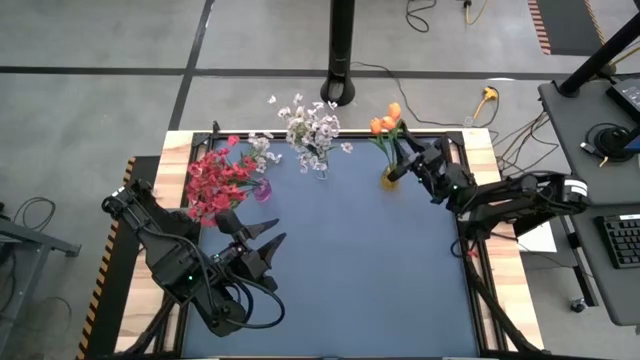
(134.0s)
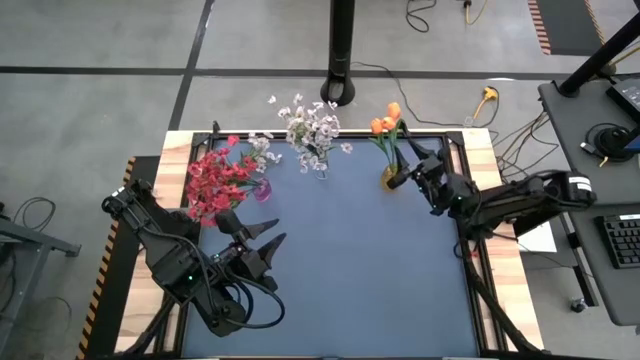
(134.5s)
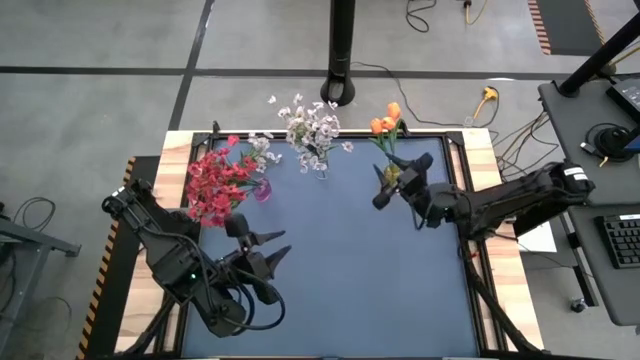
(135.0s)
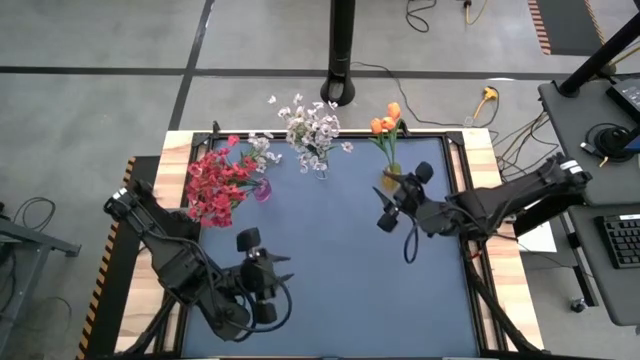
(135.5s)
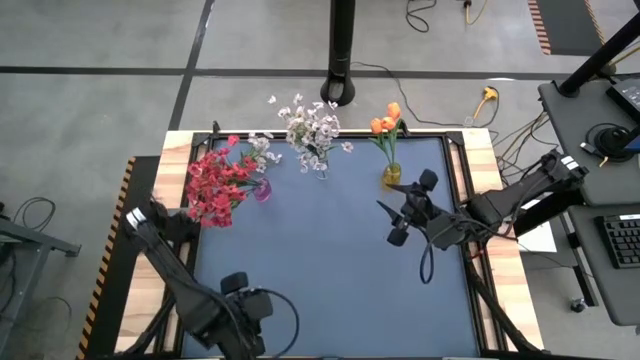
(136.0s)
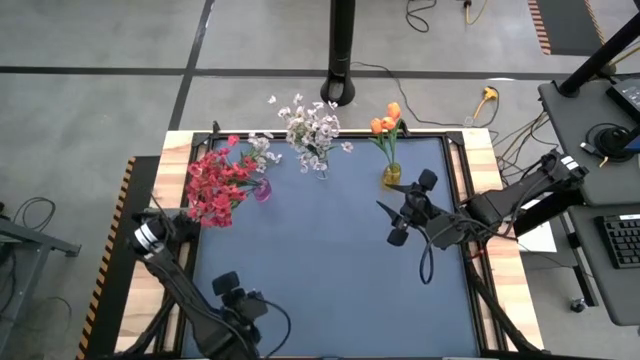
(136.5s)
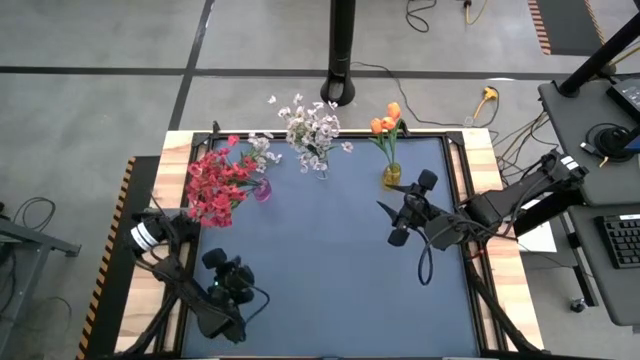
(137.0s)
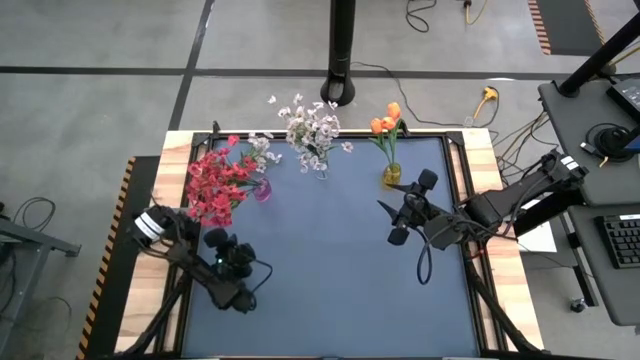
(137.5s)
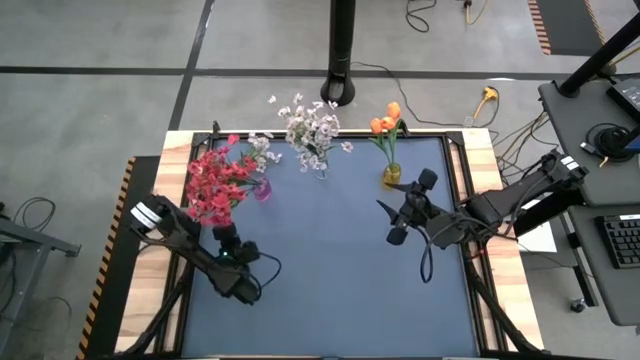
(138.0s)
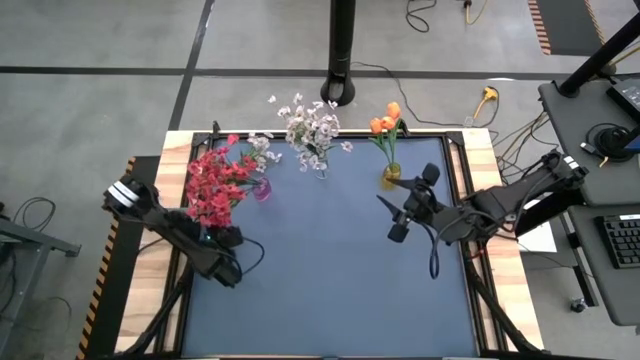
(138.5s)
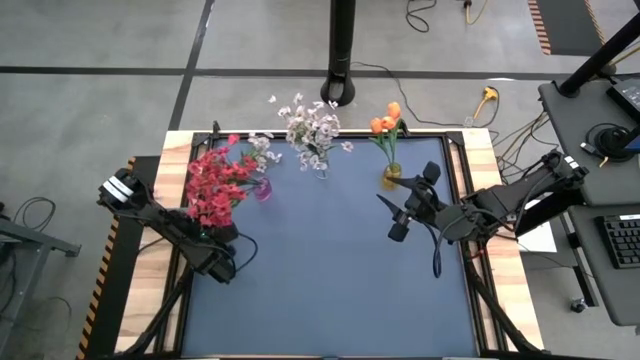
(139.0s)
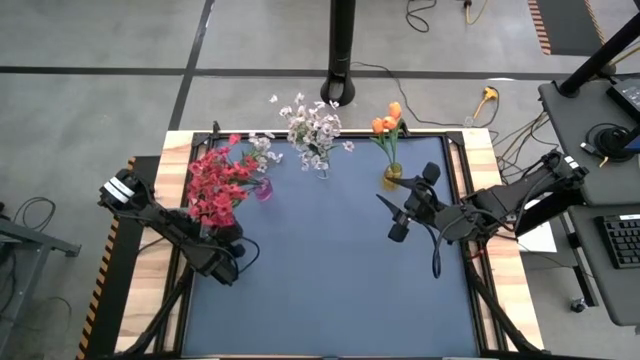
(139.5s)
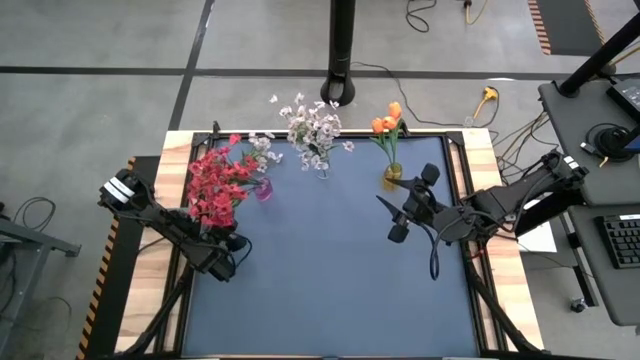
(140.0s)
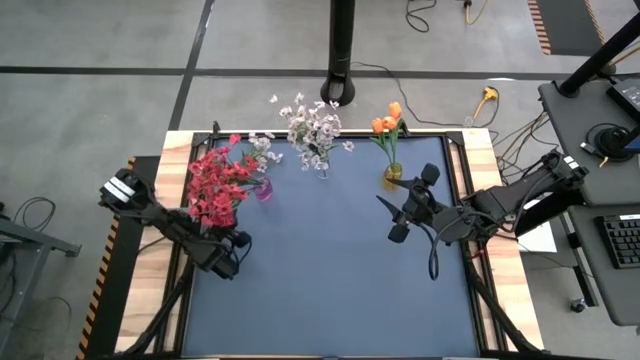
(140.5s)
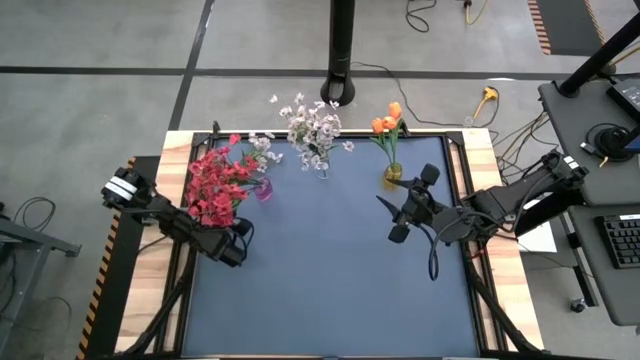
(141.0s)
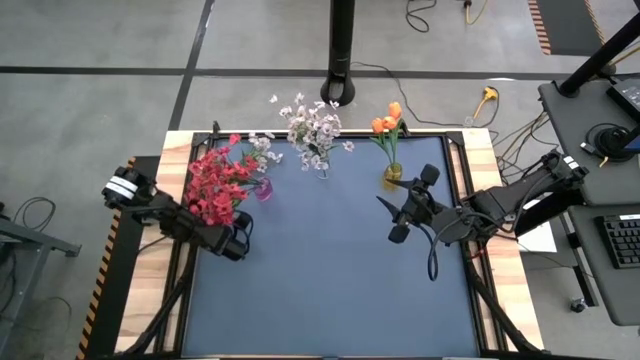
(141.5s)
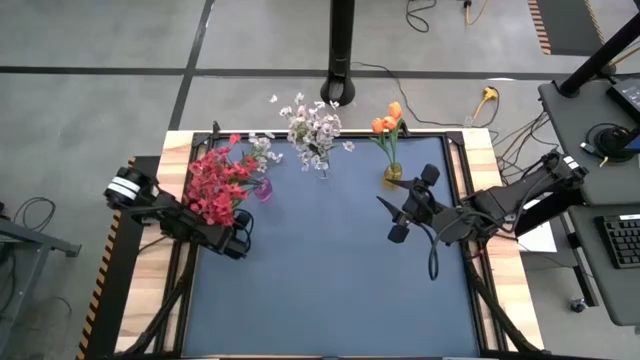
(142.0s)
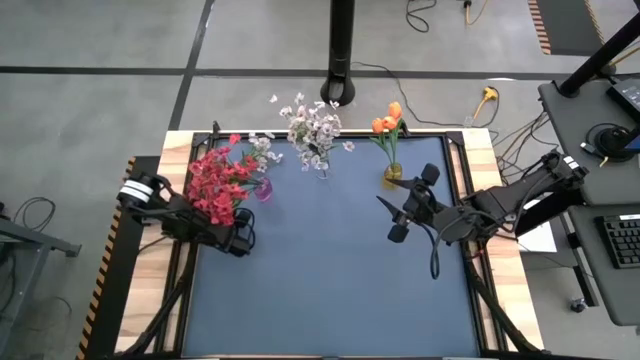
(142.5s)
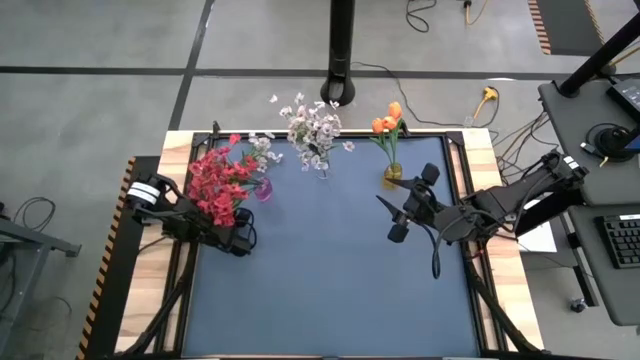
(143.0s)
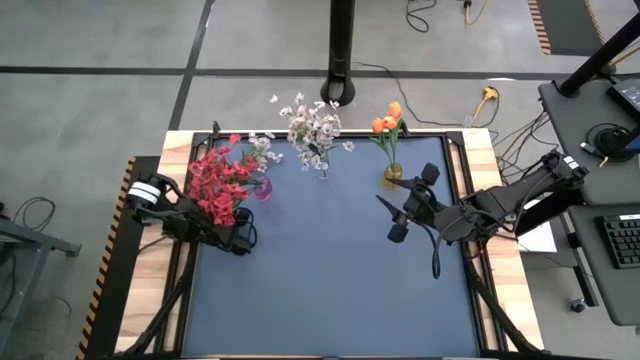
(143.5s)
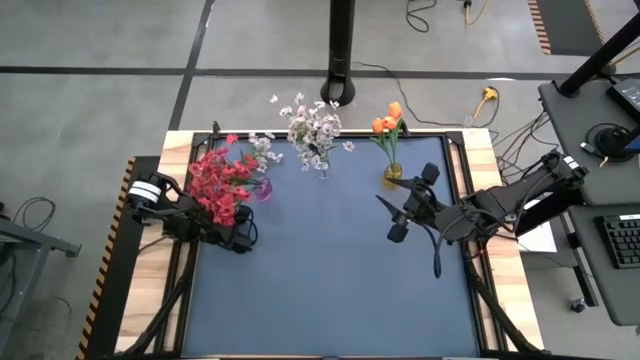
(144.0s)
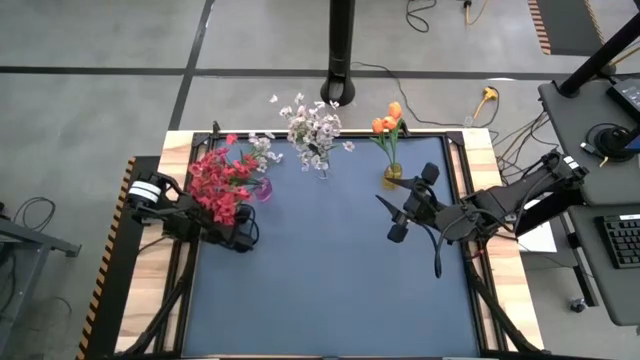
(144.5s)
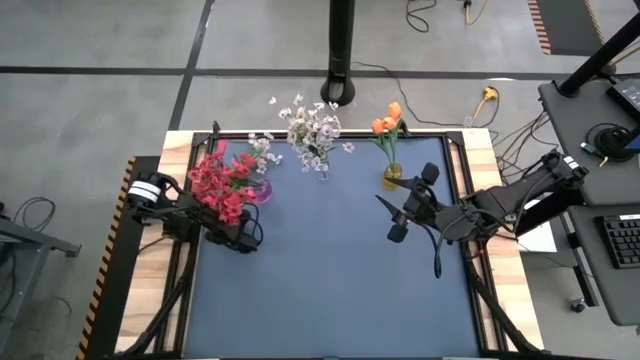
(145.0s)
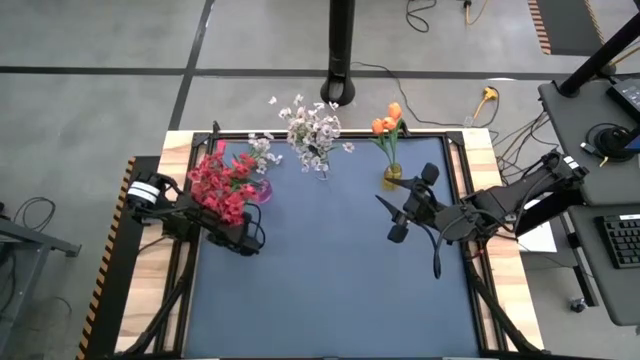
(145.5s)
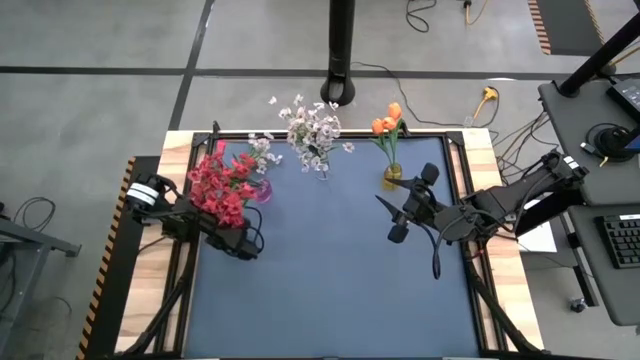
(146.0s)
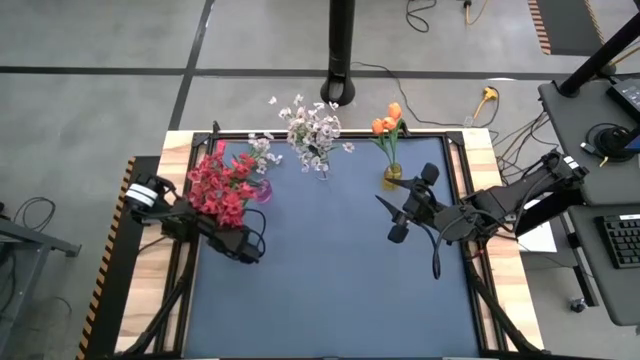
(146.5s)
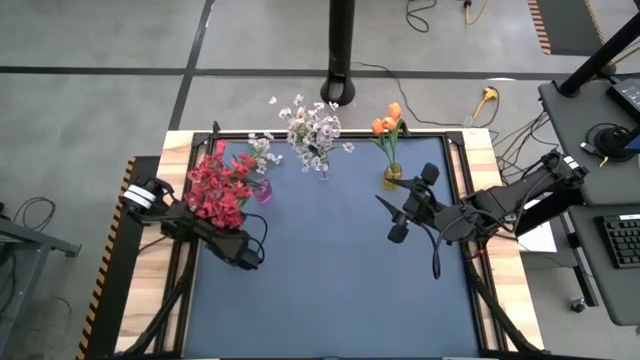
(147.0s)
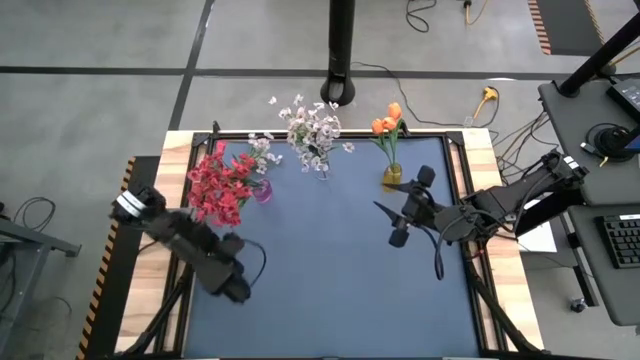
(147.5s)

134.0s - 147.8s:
Task: Sort flowers into vase by color
Adjust the purple vase

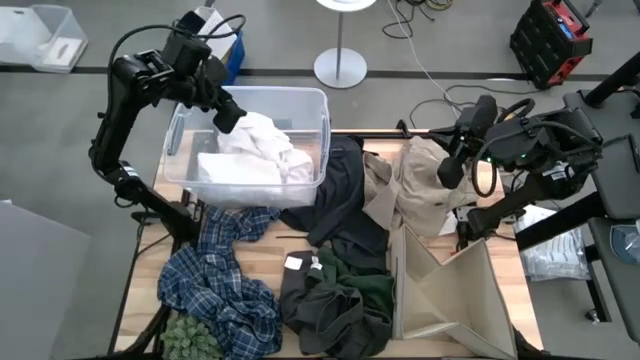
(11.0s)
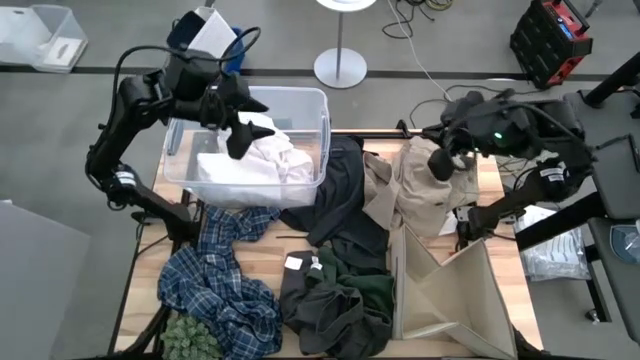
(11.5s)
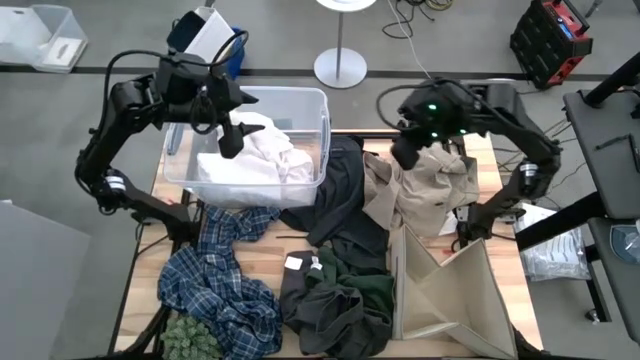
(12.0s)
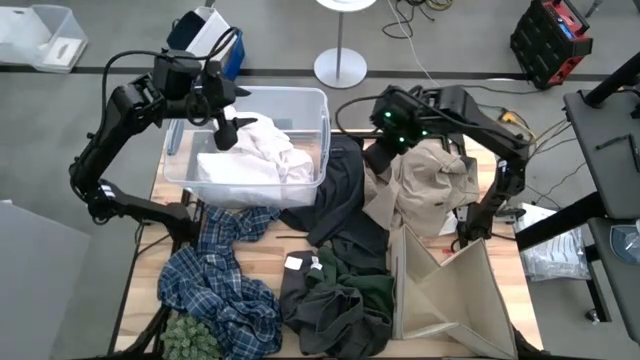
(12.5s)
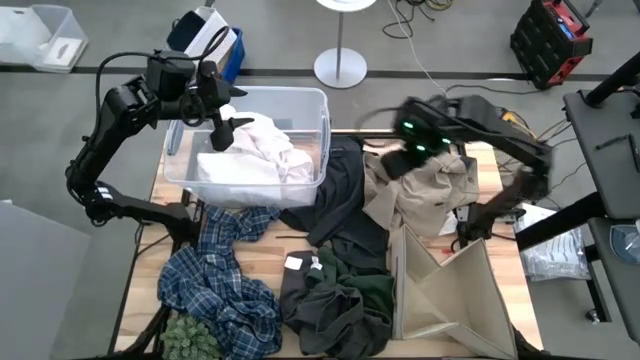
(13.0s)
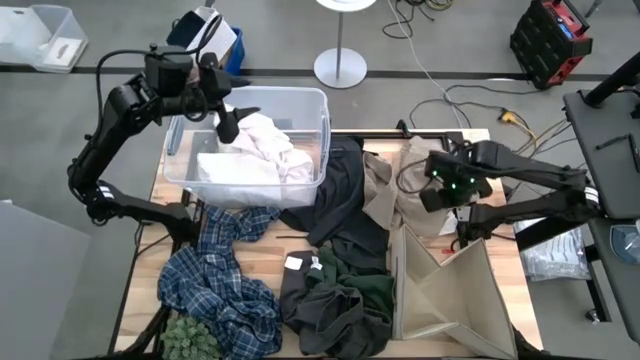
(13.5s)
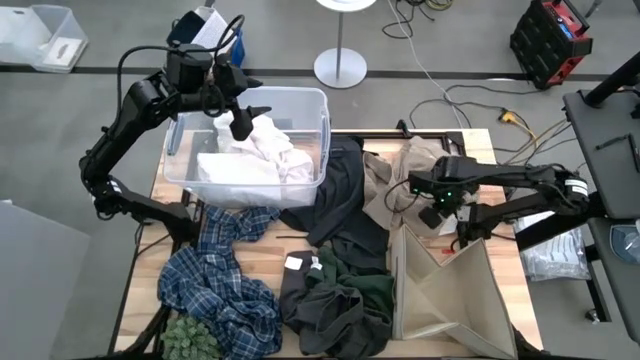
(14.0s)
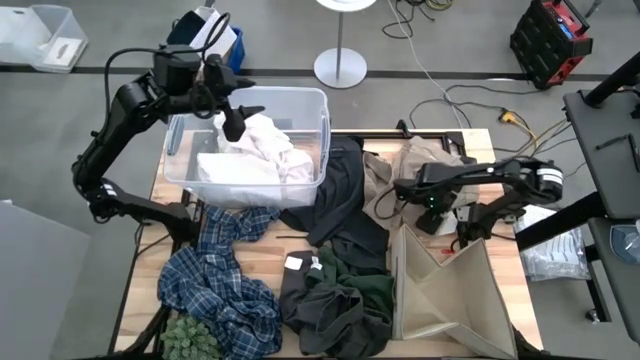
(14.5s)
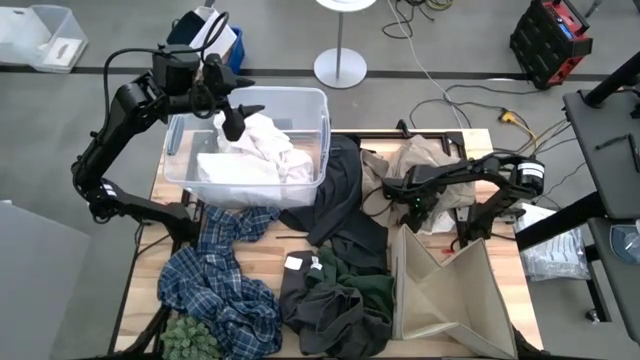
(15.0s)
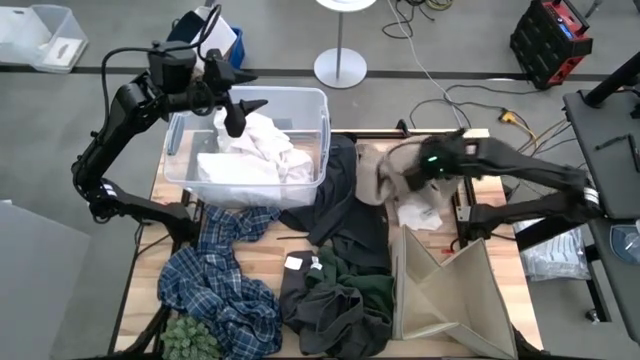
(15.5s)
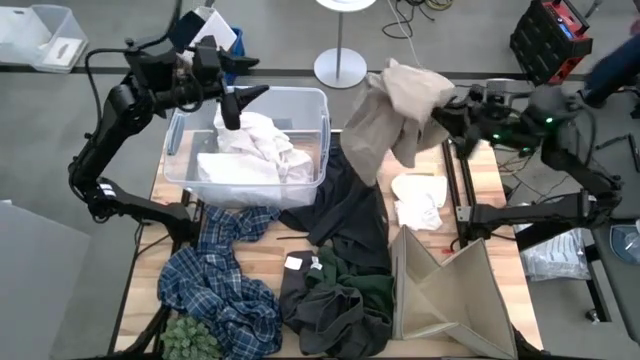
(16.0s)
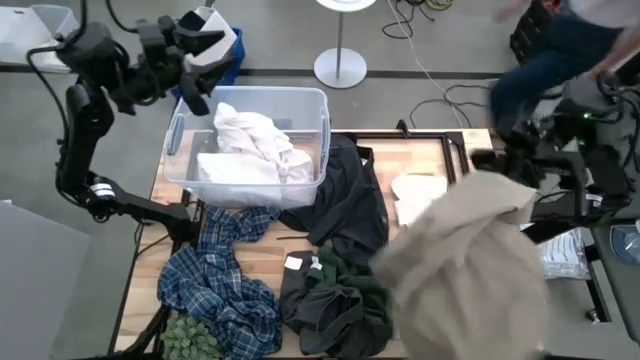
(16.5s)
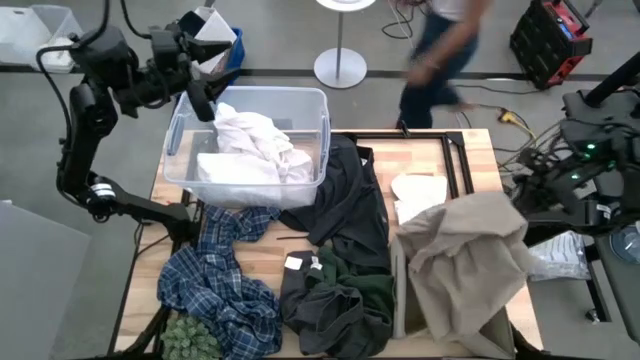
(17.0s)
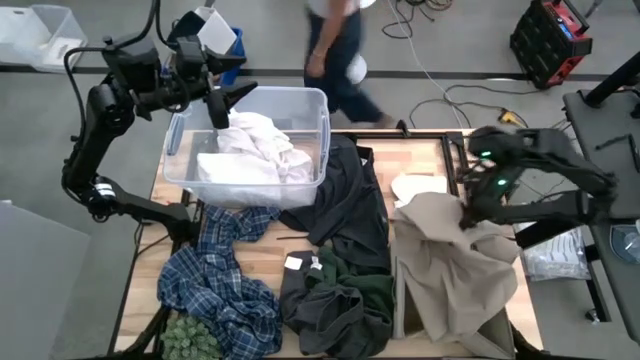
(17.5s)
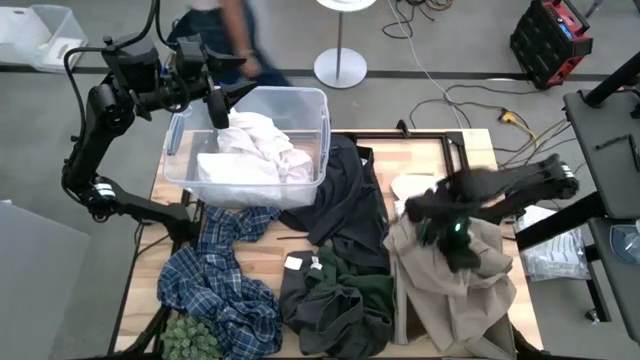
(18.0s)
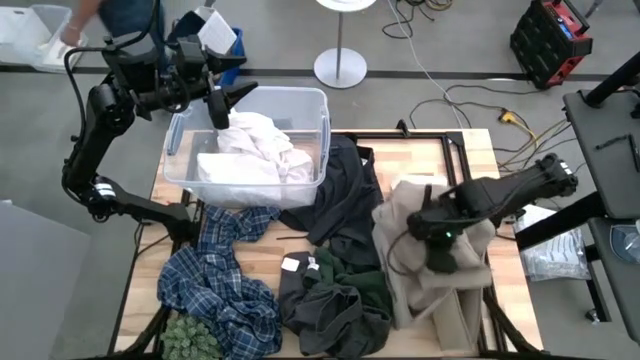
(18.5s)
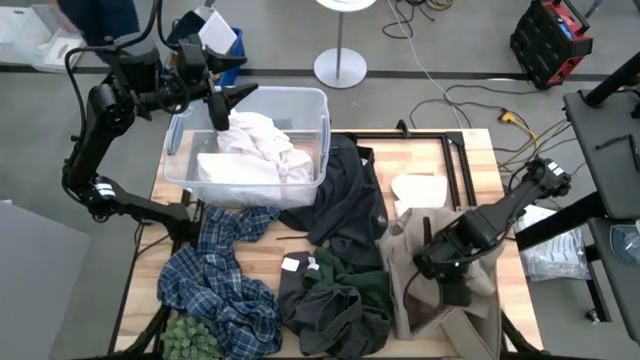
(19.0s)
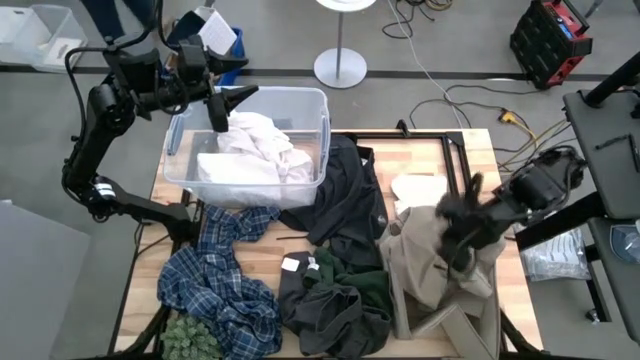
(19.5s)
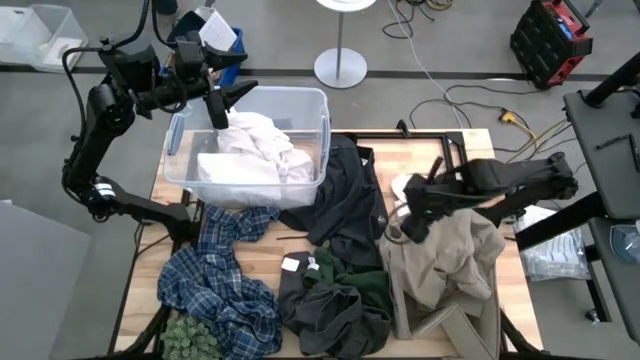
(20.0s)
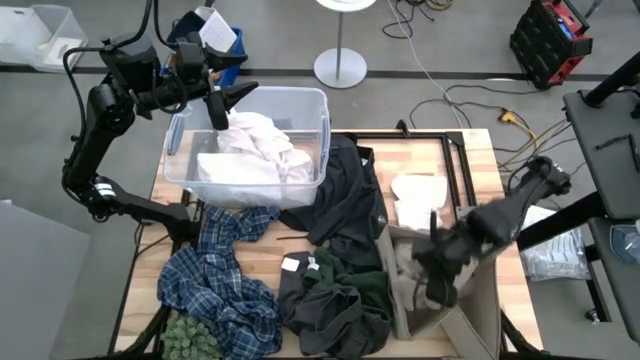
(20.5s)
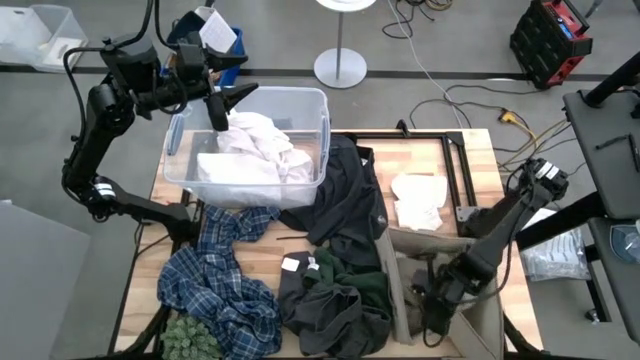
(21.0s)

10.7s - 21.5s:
Task: Sort clothes
Put the brown pants into the laundry organizer
